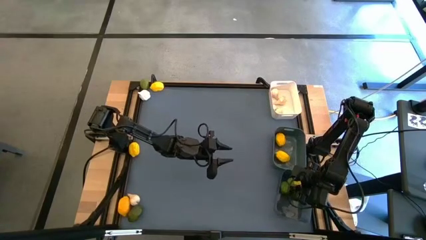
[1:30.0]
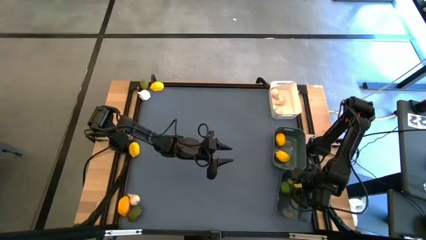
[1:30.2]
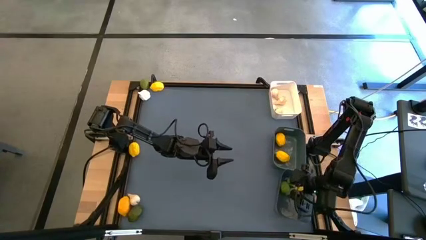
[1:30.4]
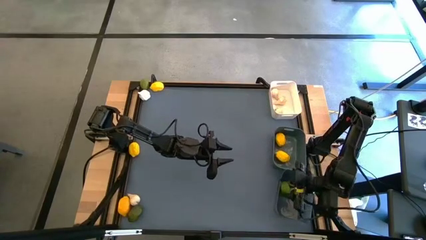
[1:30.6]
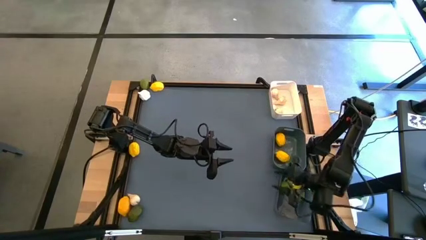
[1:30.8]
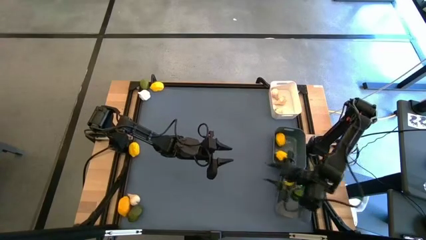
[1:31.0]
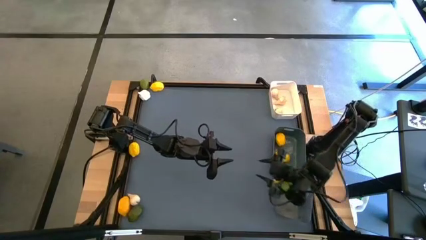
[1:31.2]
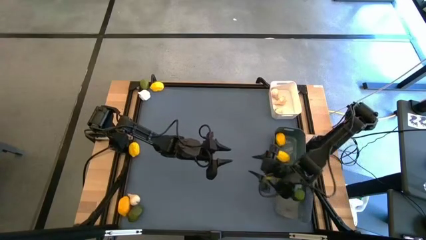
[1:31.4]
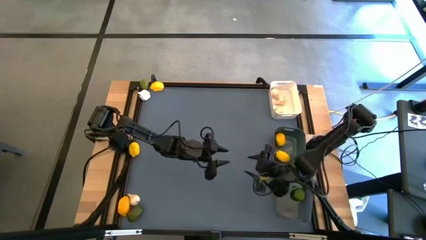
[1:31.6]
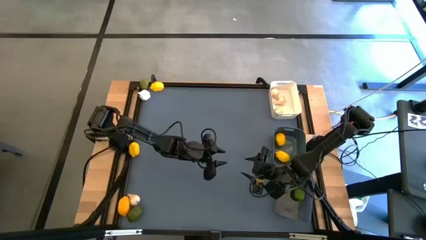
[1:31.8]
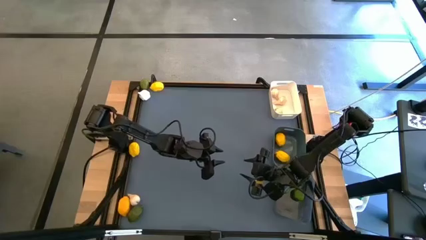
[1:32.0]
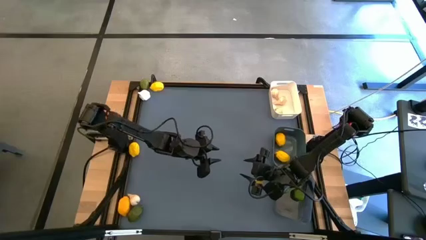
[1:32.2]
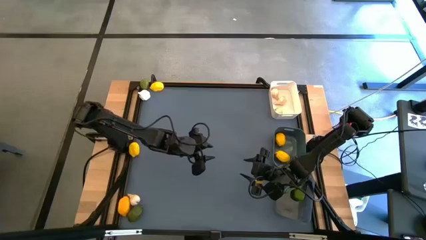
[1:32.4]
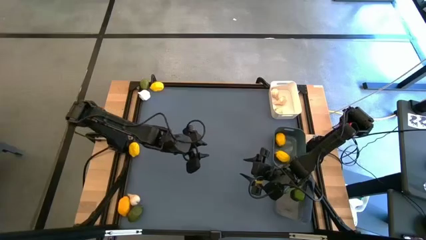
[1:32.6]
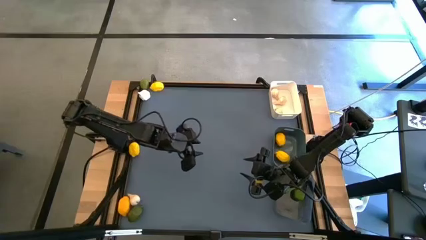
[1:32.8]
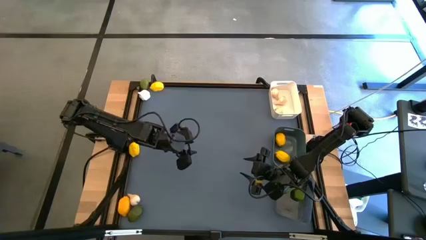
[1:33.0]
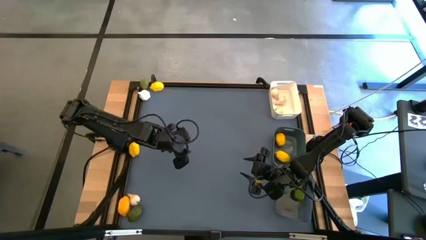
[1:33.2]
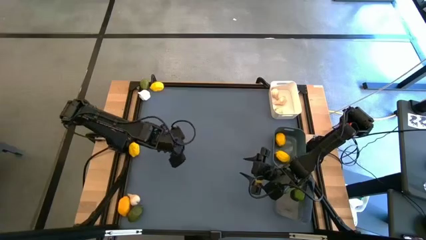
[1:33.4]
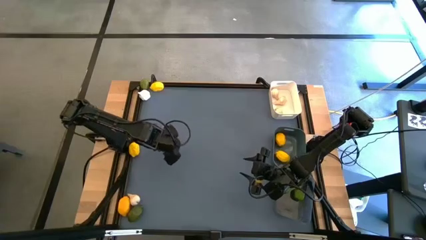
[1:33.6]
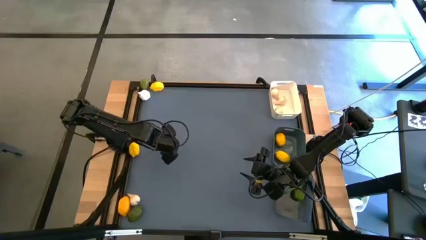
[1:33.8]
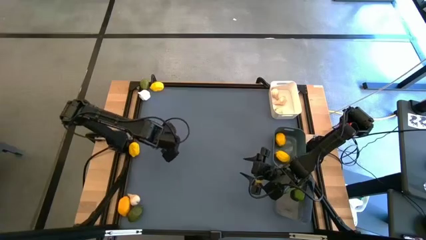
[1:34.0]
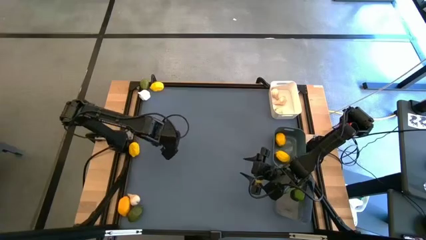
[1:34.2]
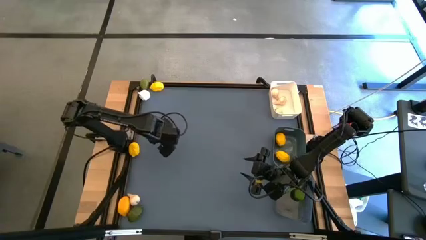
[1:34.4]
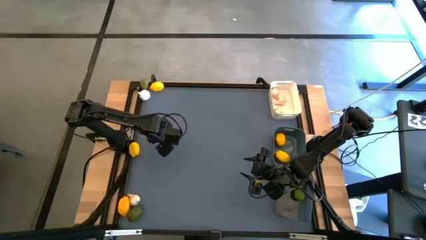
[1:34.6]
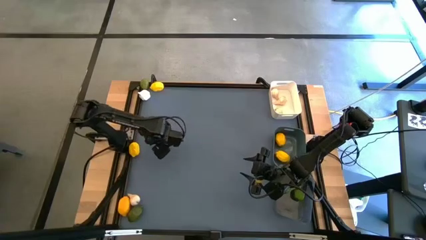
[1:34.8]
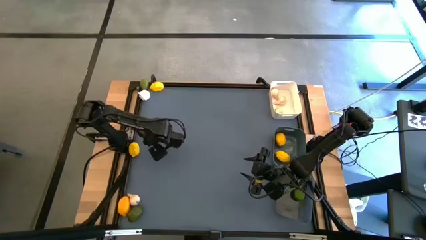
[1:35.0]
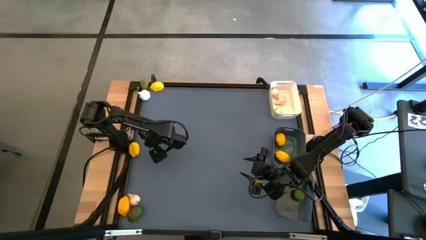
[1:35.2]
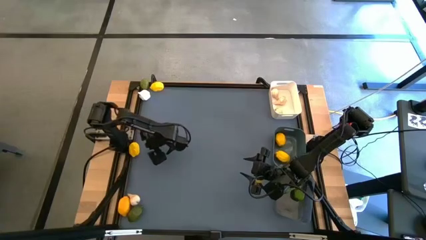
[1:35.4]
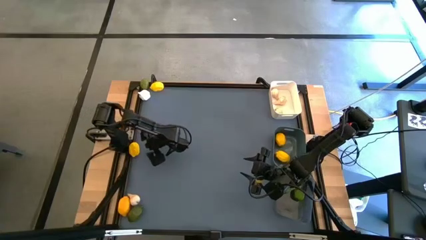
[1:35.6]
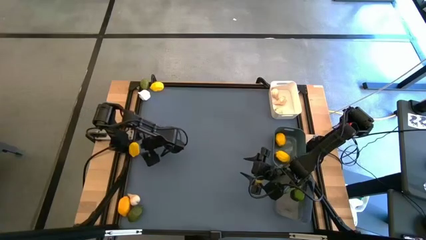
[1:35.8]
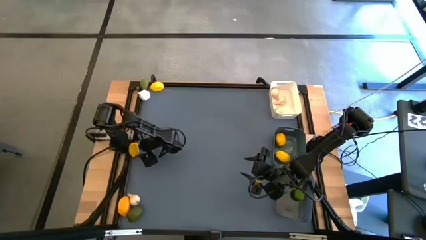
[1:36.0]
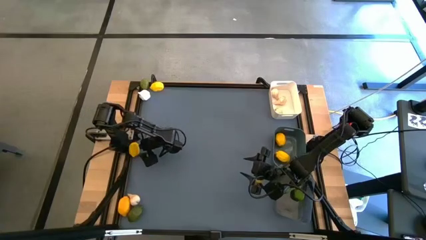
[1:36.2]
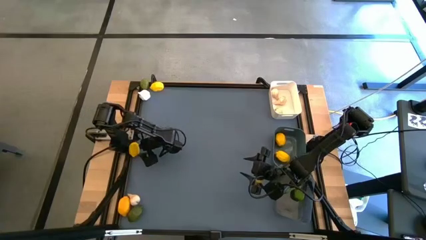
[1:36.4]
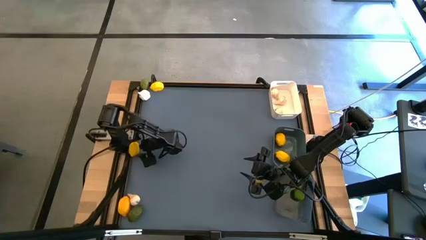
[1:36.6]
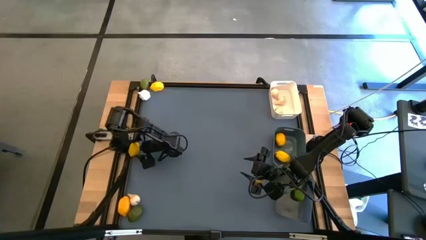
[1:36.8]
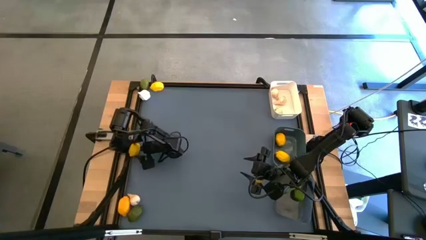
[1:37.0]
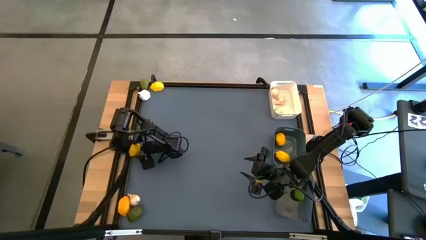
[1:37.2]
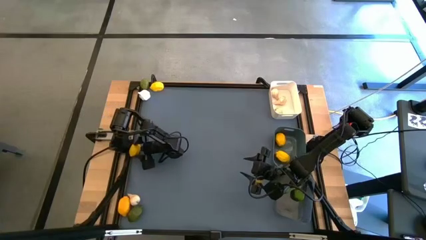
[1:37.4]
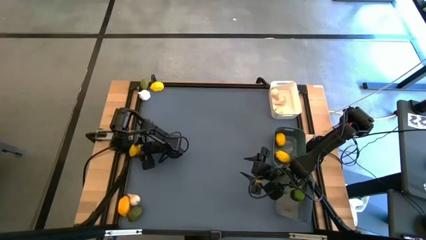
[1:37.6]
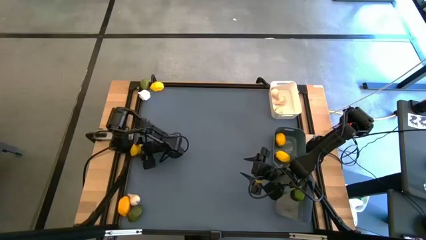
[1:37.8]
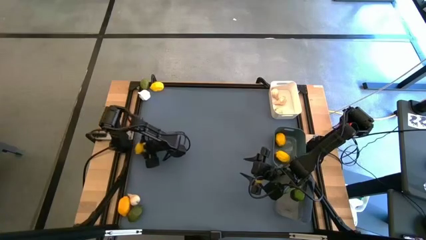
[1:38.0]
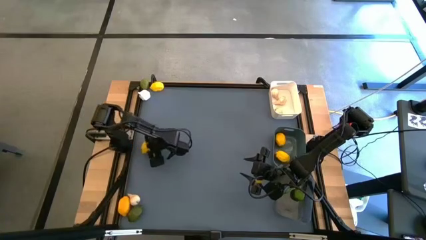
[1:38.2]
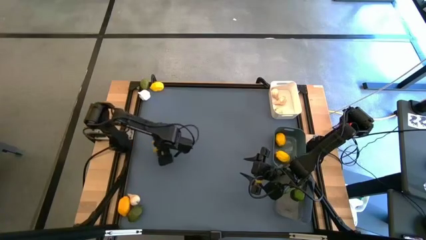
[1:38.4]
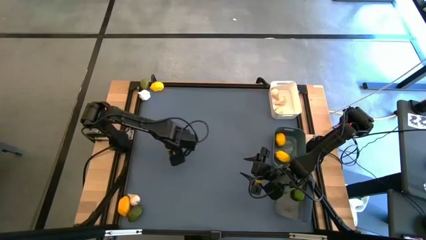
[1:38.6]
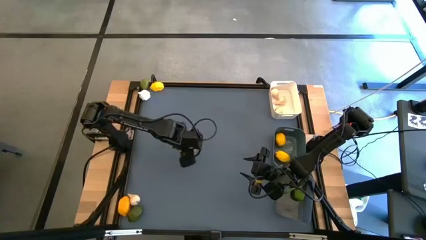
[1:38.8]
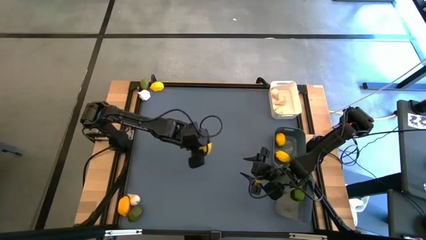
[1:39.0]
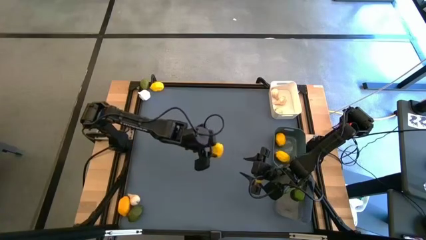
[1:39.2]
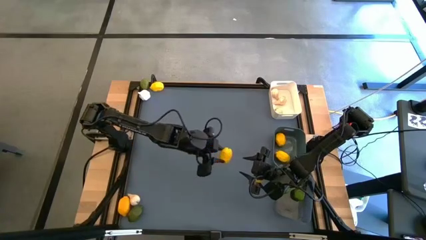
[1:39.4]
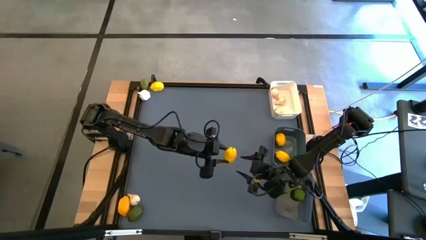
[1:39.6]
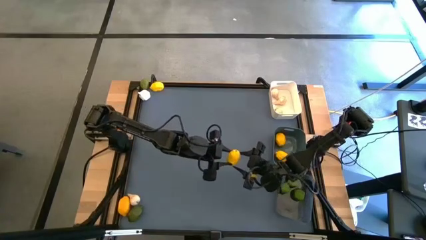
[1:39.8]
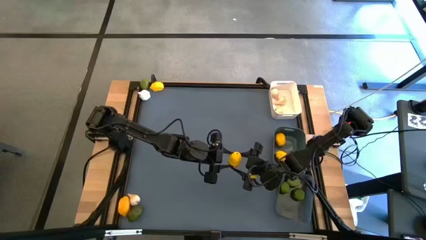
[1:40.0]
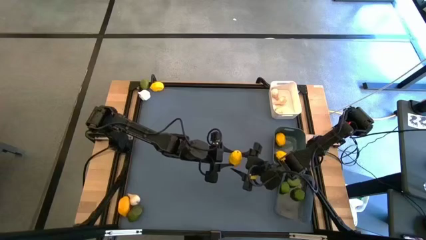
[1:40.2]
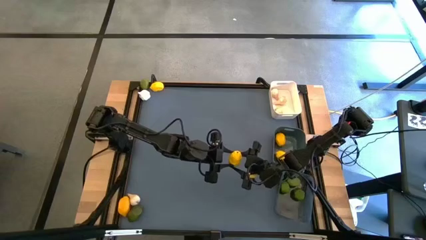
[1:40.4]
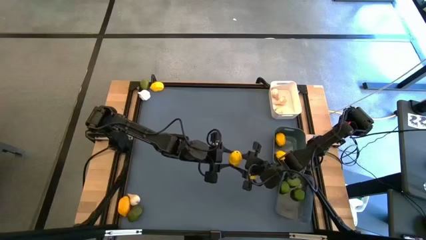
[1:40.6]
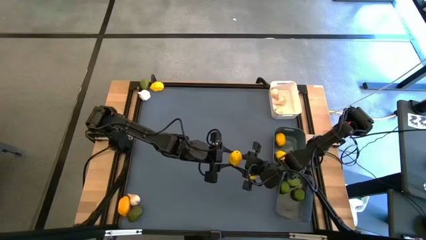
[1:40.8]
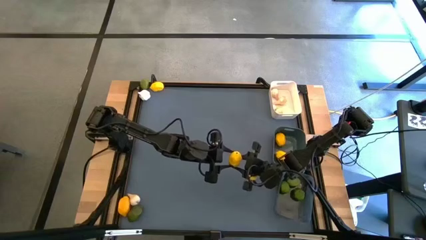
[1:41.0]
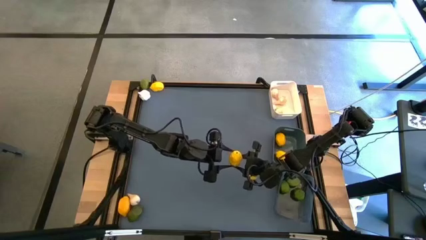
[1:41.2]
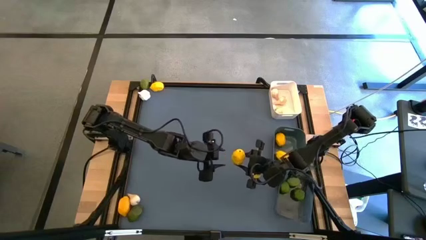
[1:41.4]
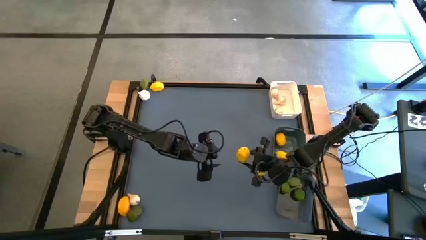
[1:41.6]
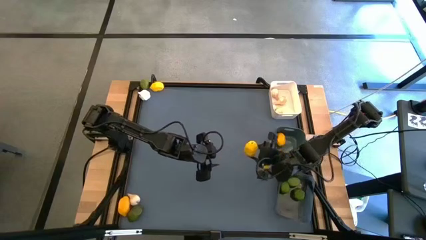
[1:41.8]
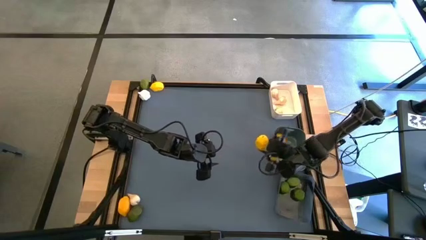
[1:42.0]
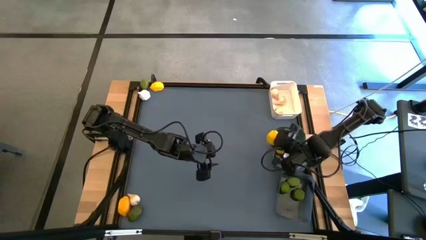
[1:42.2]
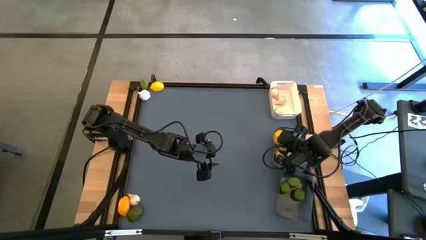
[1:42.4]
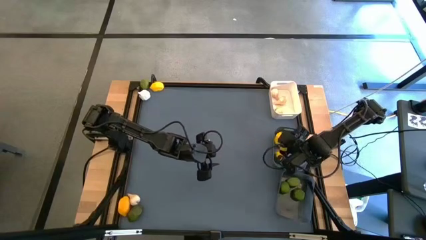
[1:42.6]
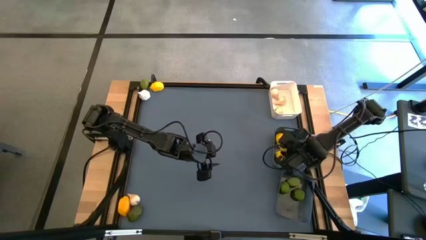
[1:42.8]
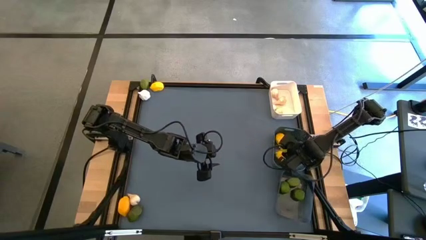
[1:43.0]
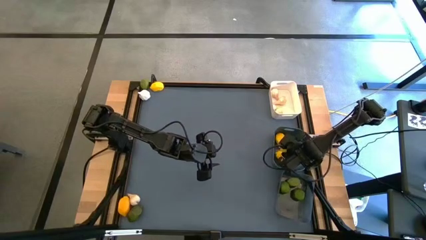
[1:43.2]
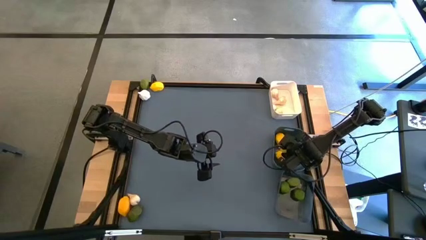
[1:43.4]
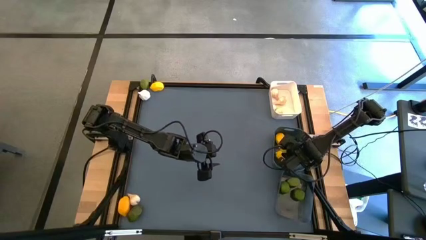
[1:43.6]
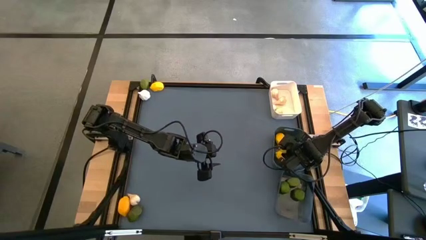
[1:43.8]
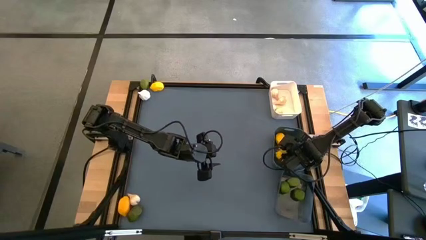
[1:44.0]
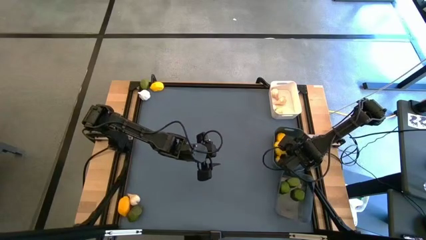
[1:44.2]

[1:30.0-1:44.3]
Task: Sort produce into baskets
Put the yellow lemon into the gray bin

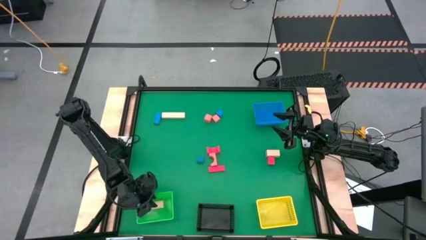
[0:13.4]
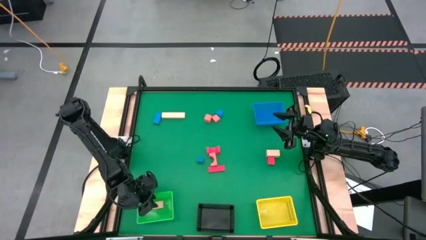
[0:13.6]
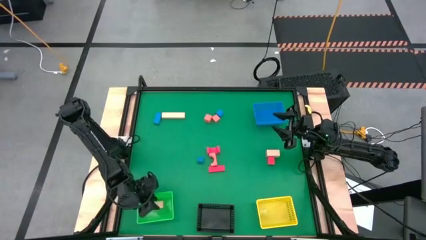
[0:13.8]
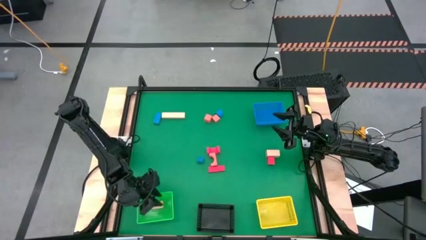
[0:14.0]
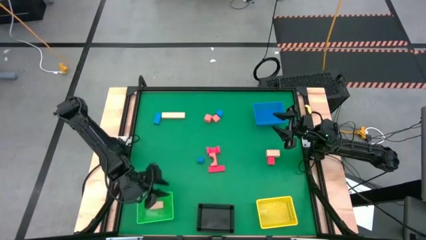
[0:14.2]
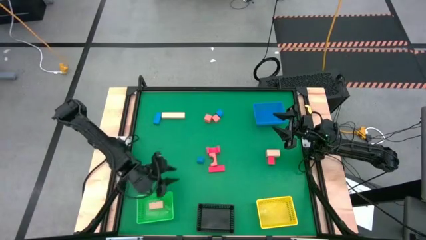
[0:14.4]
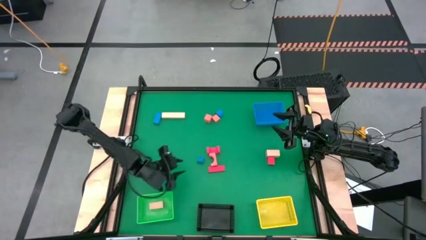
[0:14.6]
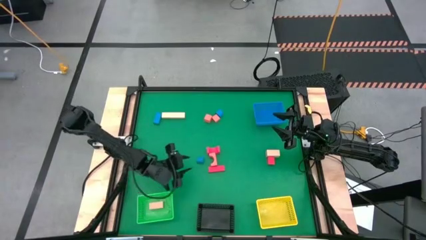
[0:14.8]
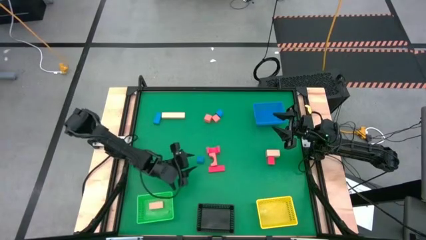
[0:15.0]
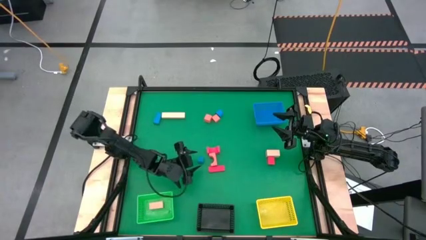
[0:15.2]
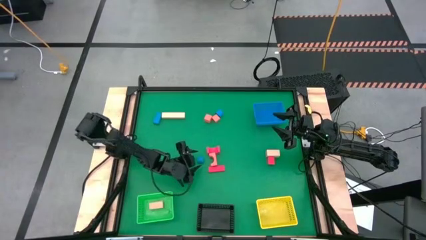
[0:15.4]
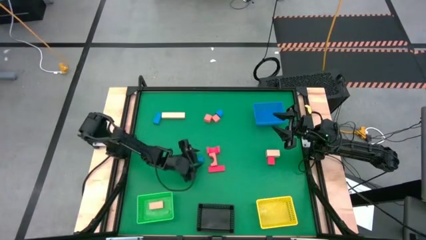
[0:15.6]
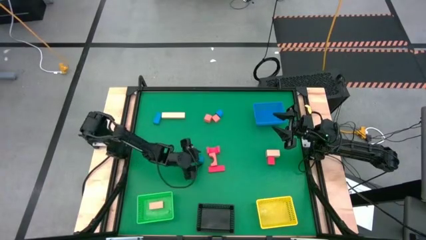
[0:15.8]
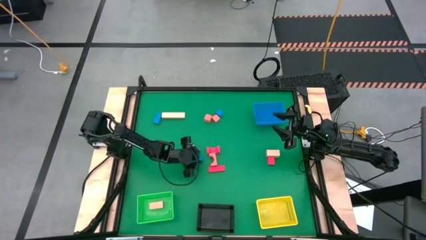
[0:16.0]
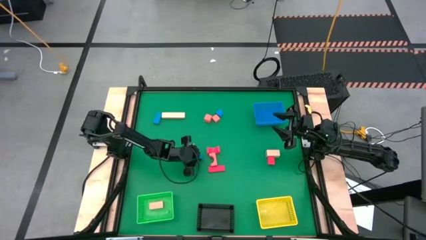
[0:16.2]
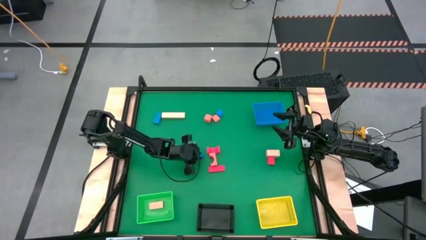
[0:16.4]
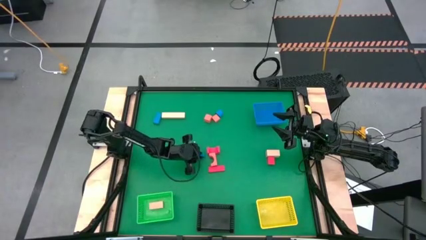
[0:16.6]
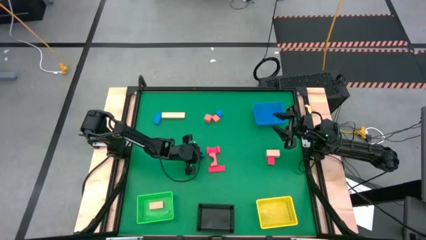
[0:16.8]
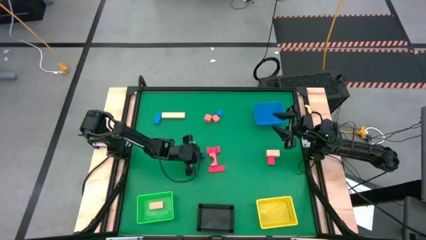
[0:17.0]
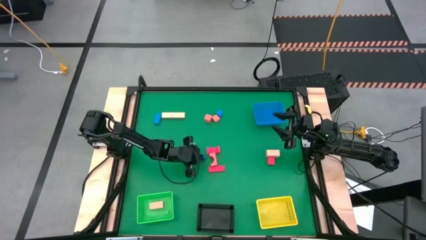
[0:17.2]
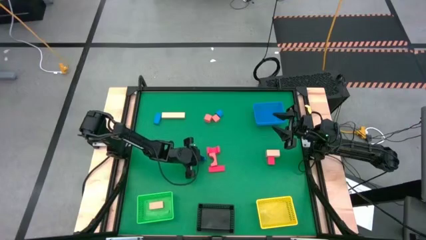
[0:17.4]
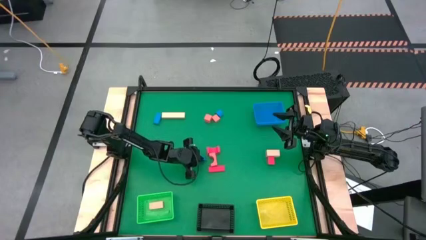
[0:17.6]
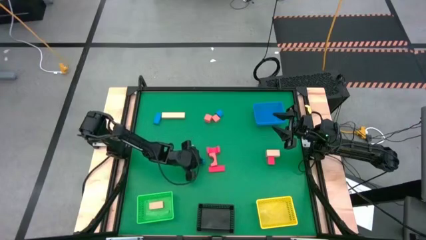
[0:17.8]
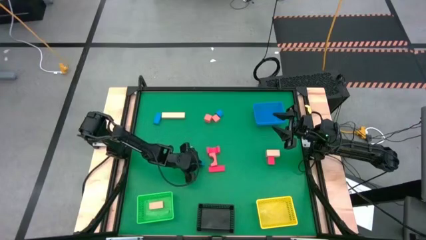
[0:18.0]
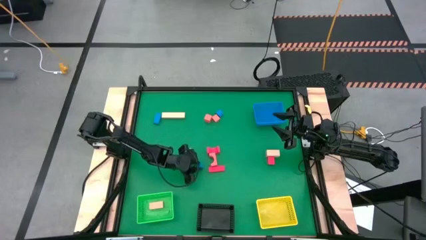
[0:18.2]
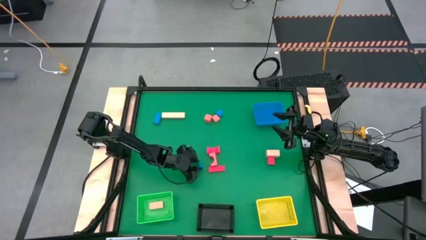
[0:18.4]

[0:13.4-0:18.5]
Task: Sort & place blocks by color
Put the blue block into the black bin
